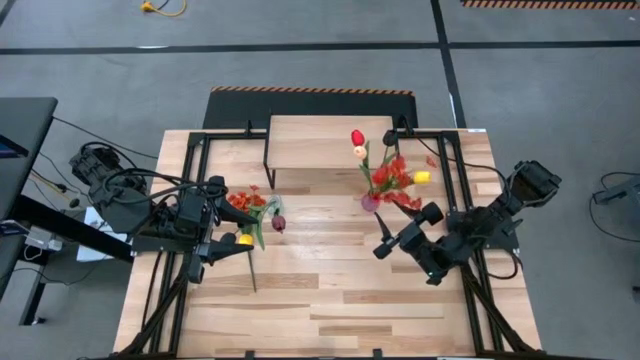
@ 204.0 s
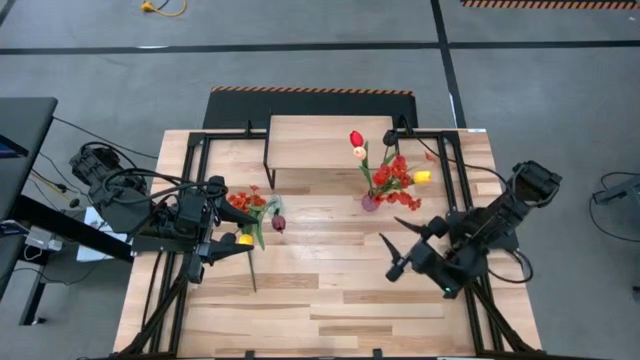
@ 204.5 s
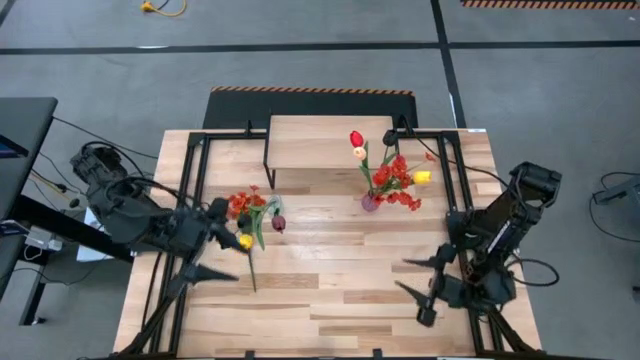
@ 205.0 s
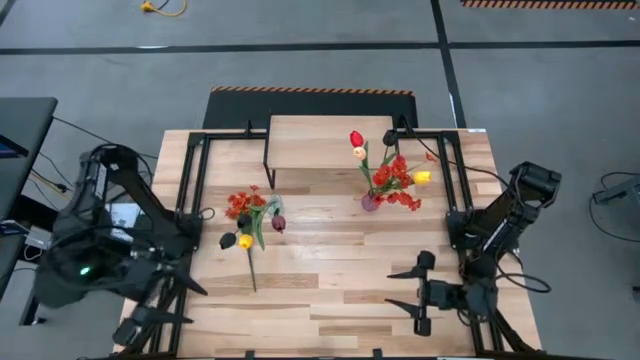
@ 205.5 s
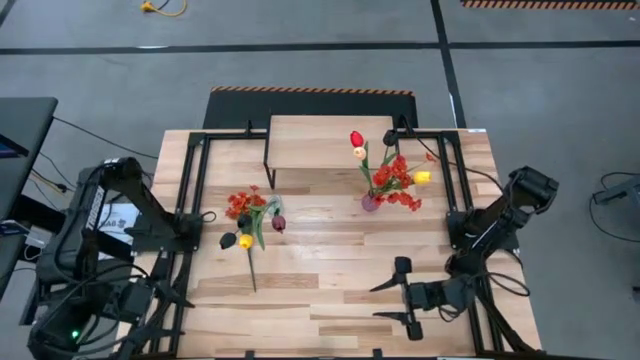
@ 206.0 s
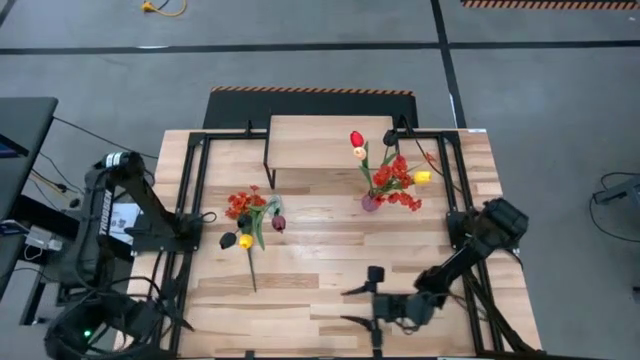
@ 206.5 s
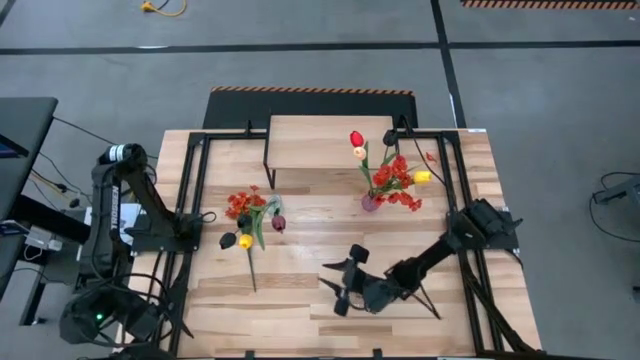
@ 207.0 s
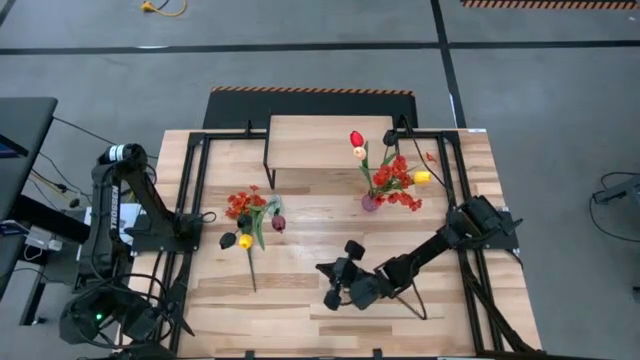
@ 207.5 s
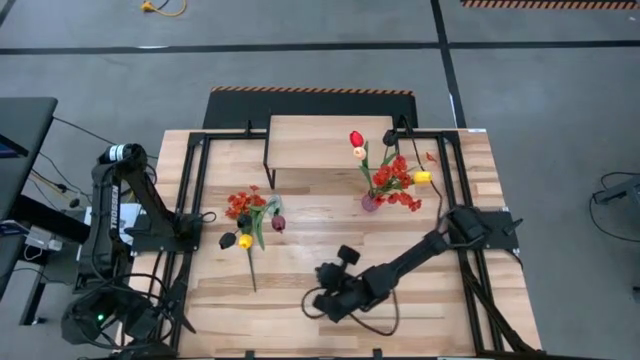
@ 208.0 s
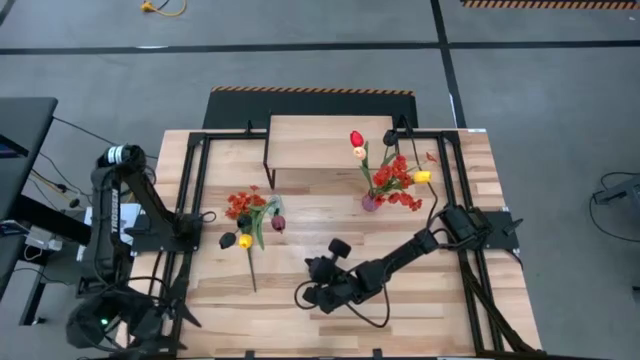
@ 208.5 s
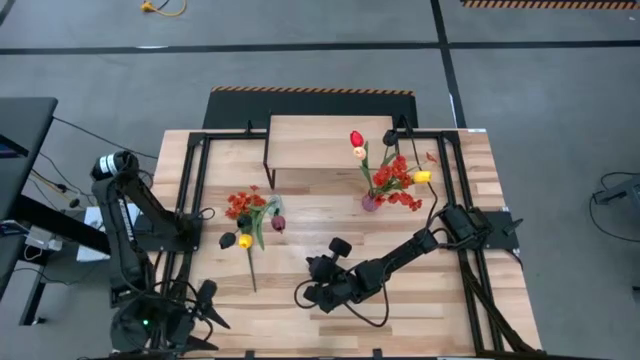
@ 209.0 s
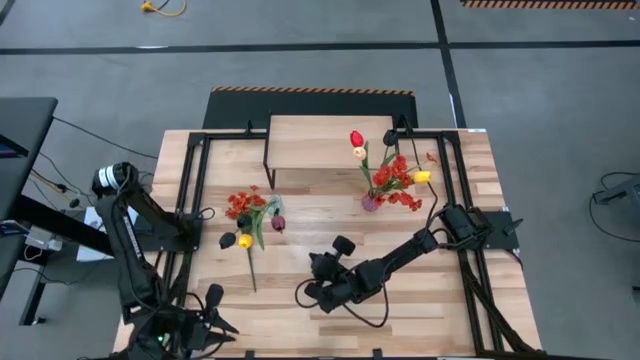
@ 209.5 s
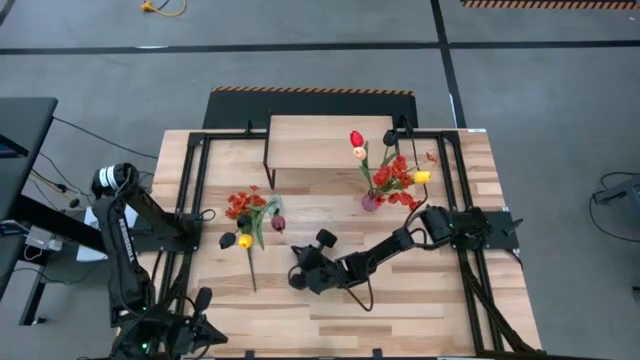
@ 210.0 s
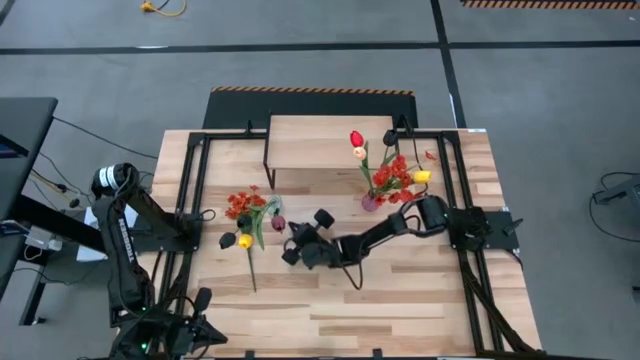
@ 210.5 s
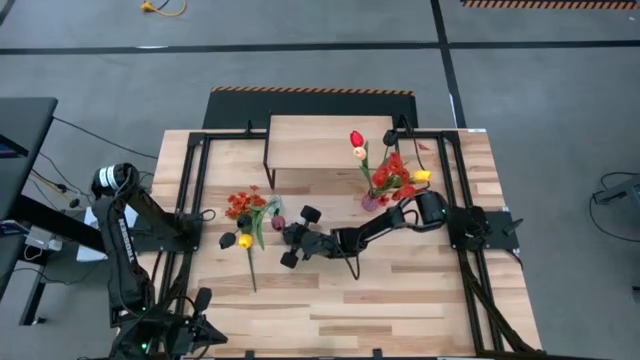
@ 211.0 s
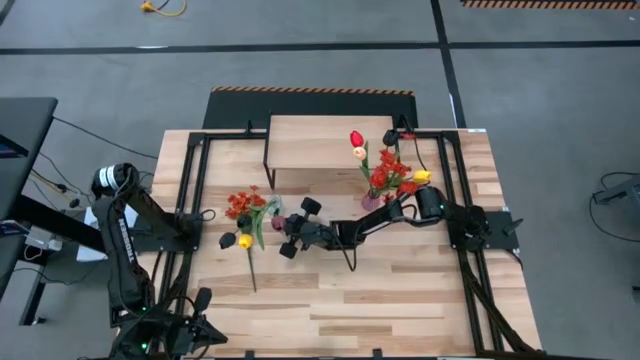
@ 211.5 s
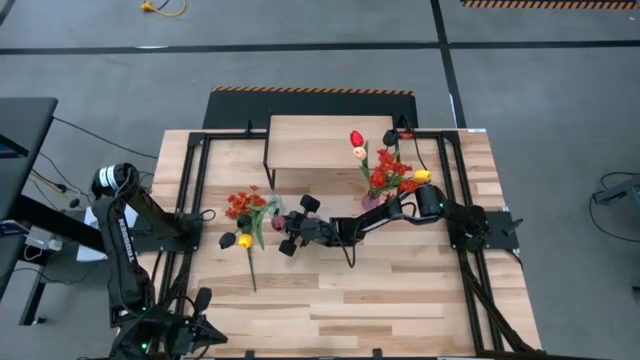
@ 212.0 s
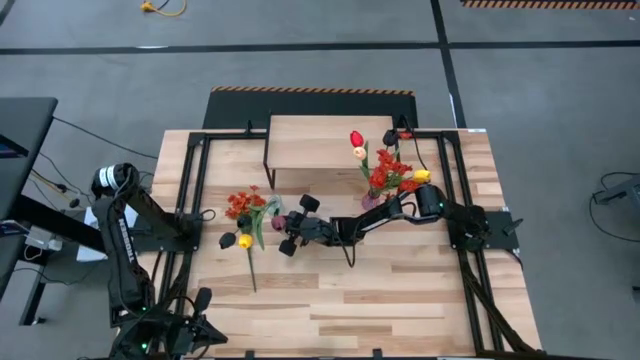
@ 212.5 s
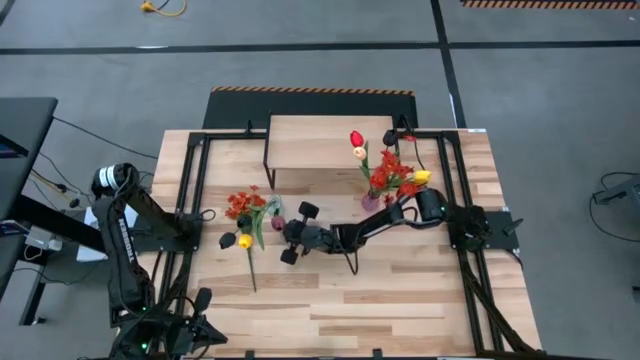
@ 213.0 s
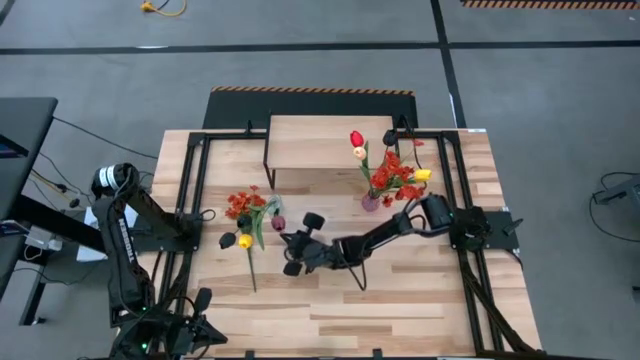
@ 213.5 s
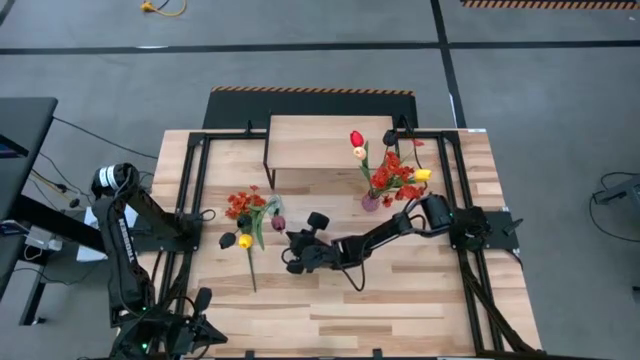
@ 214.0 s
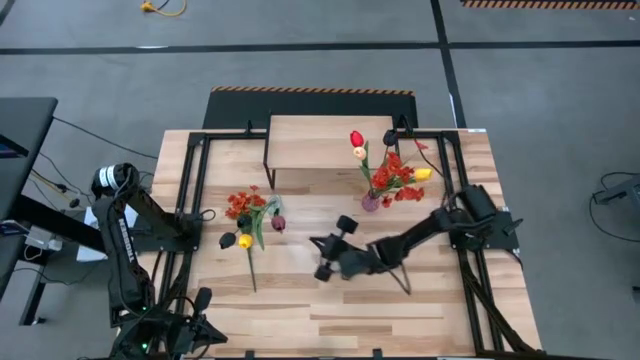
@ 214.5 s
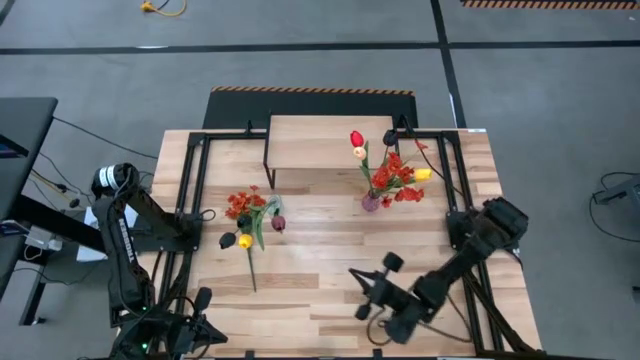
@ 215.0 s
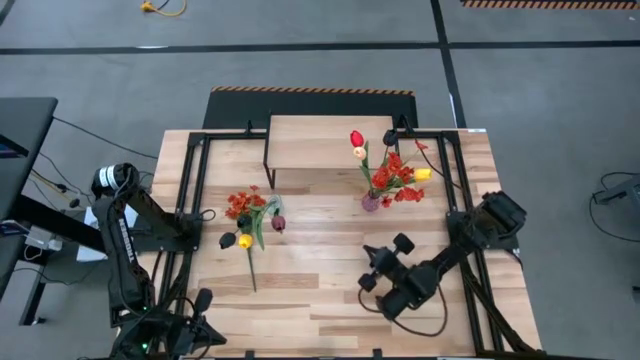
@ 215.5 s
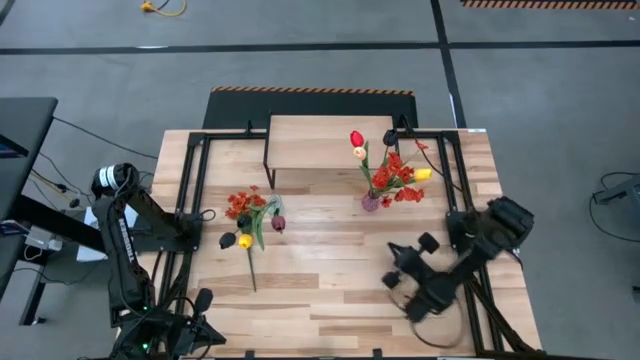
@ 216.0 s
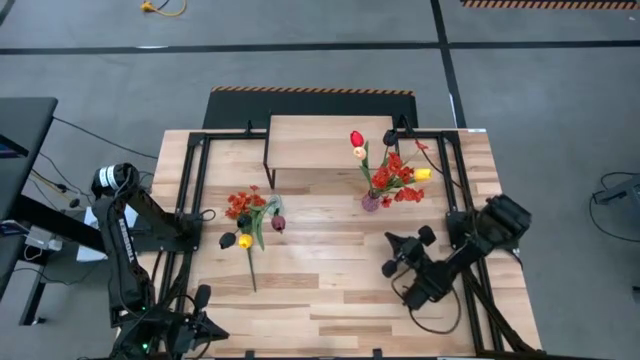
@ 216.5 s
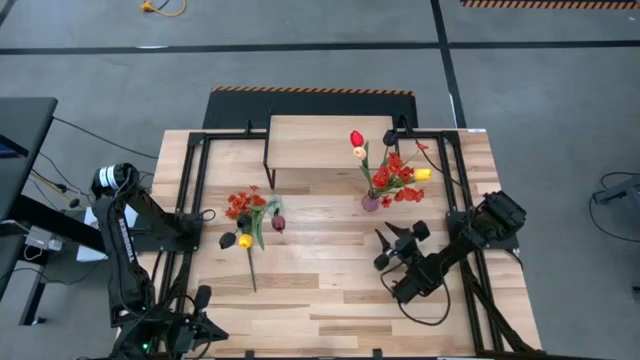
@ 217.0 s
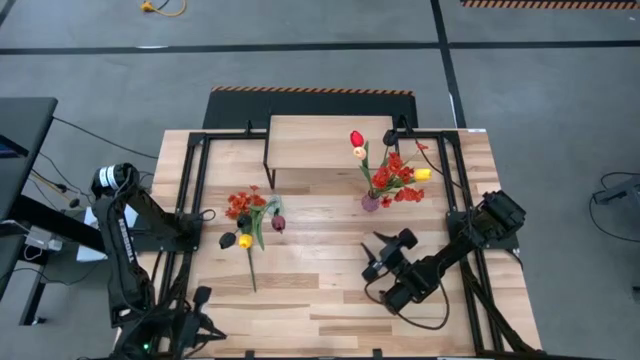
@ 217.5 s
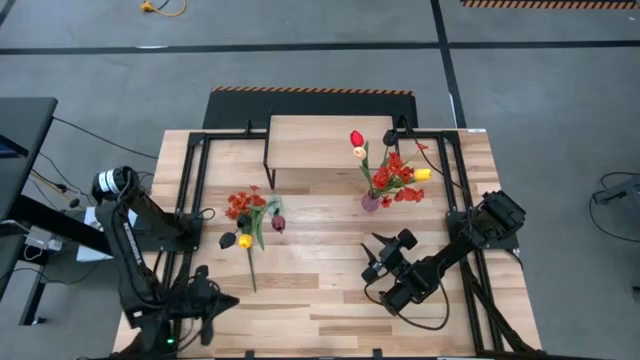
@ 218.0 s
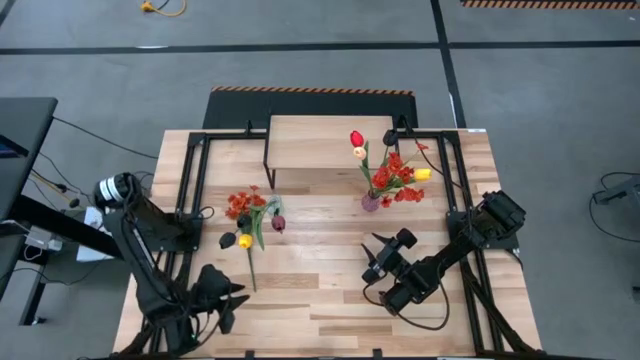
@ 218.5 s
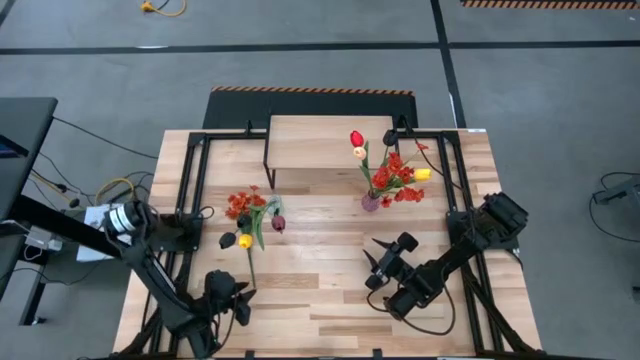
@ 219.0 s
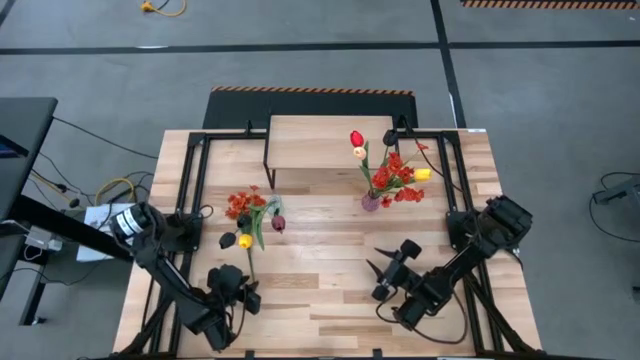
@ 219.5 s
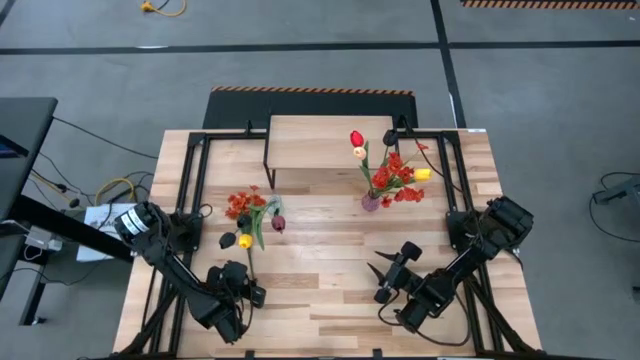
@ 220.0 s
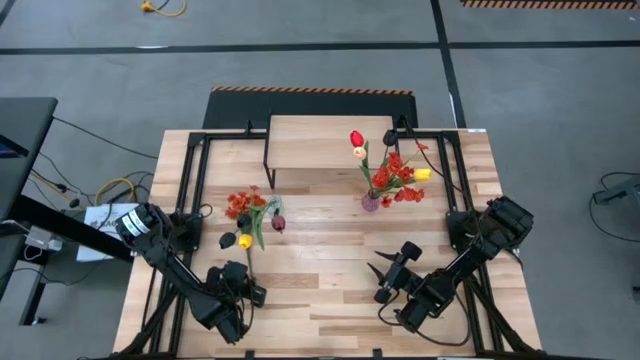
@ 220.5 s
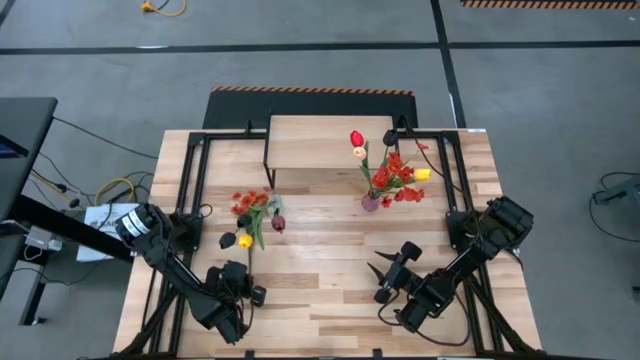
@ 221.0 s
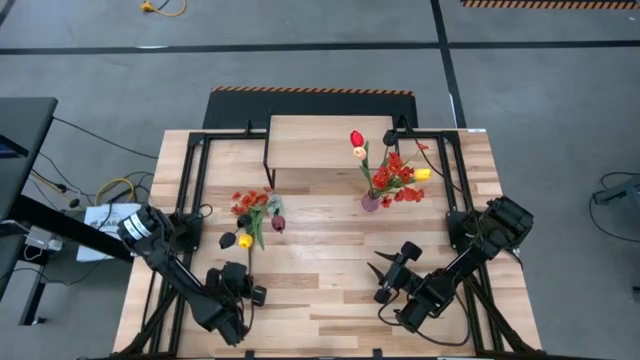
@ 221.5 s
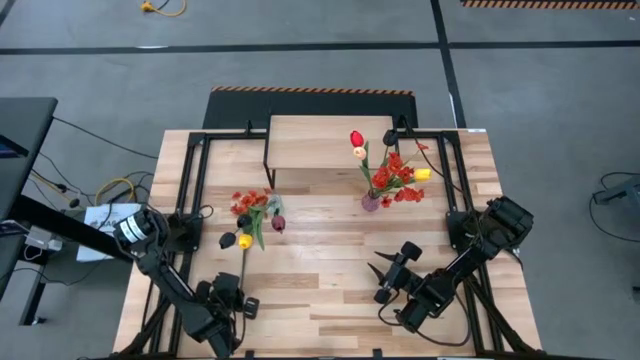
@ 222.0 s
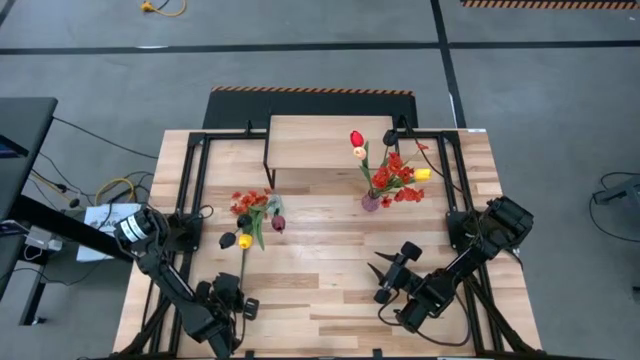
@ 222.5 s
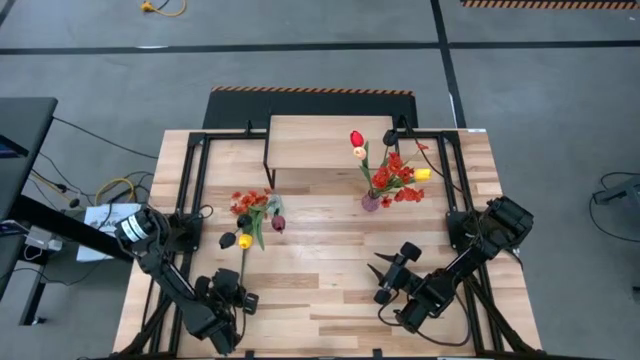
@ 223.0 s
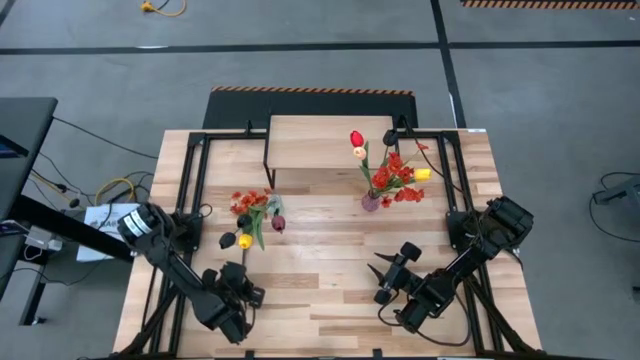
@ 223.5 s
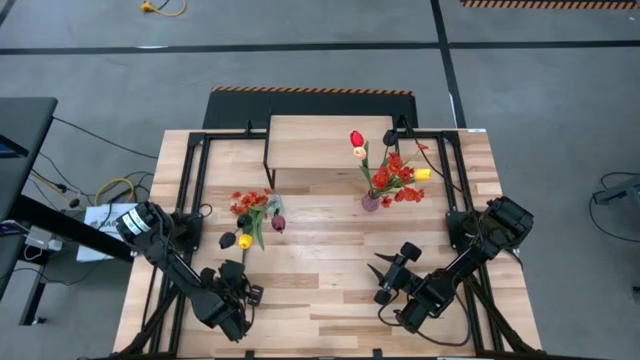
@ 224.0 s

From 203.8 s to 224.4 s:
Task: Pick and place flowers into a vace then onto a shelf
Put the red flower into the transparent vase
